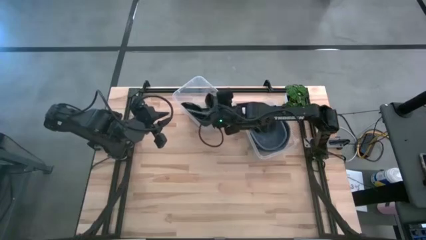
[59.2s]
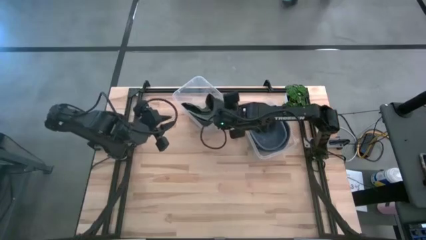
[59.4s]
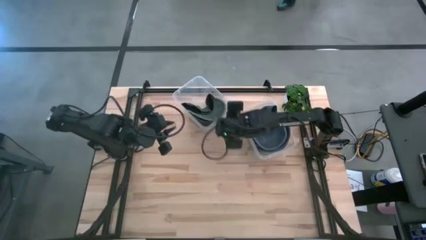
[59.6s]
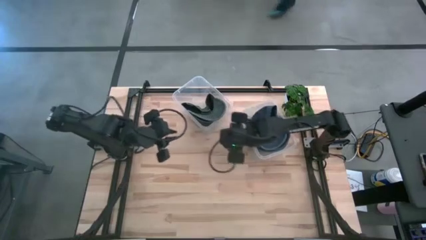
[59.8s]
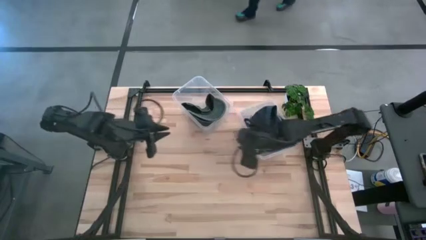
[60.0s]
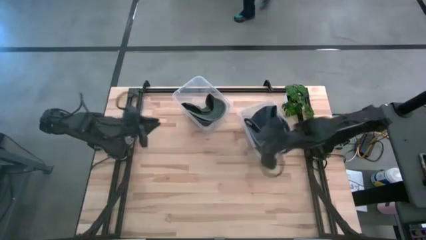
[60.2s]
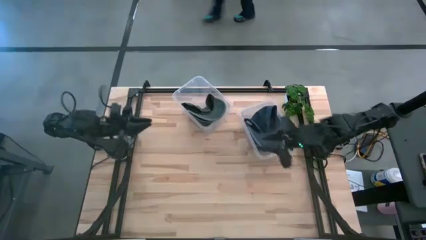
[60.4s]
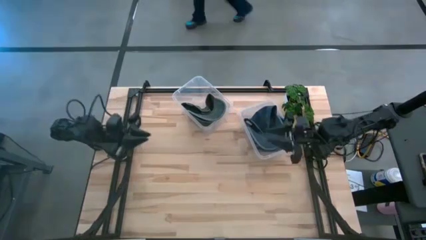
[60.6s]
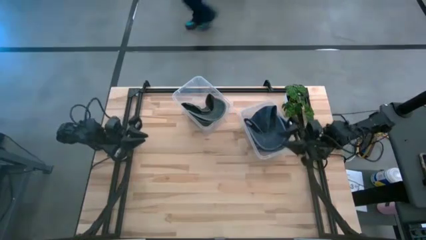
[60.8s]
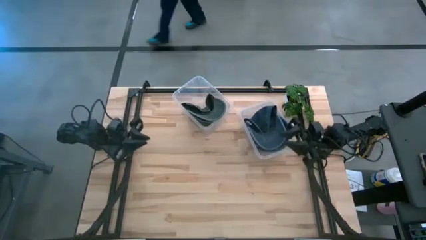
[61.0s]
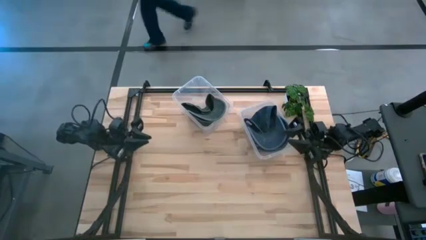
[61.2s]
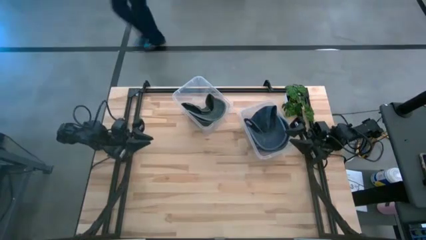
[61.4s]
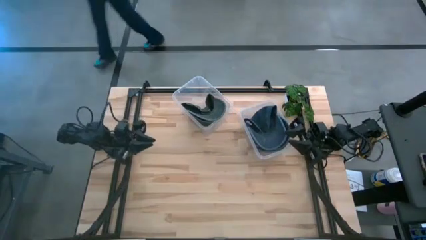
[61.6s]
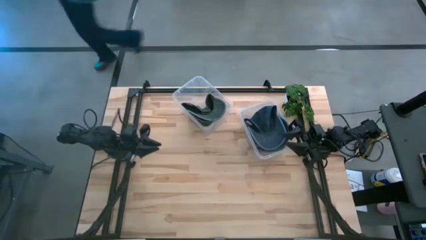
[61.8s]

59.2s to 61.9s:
Task: Pick & Place hat
Return to Home Position

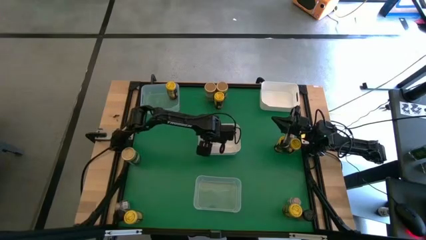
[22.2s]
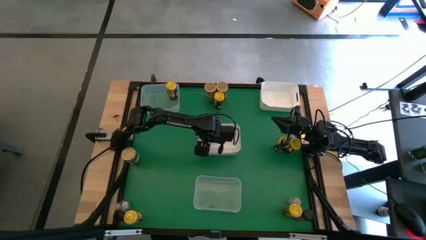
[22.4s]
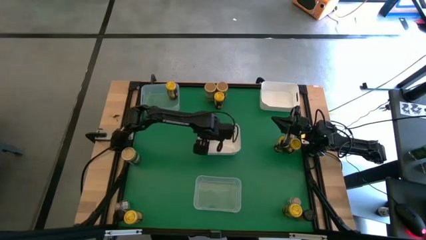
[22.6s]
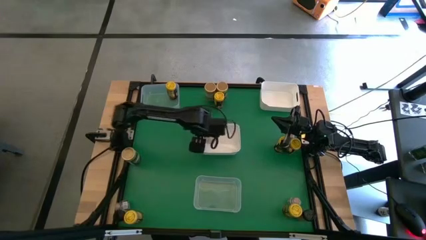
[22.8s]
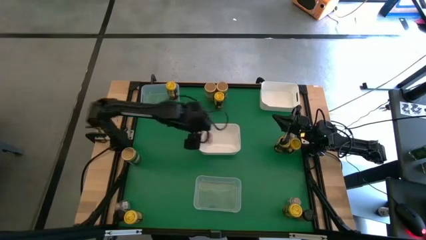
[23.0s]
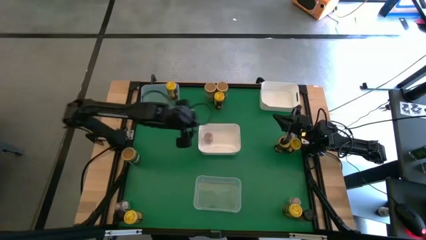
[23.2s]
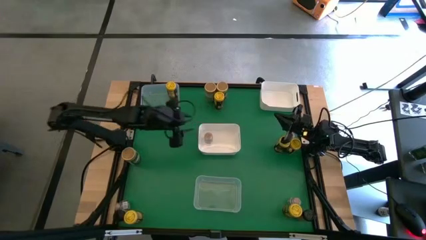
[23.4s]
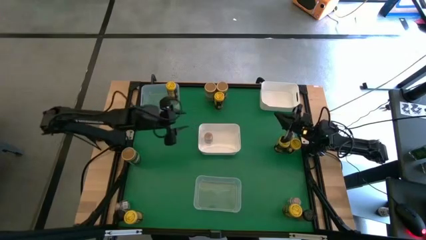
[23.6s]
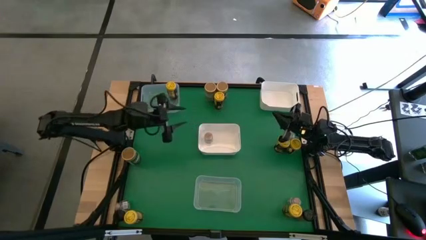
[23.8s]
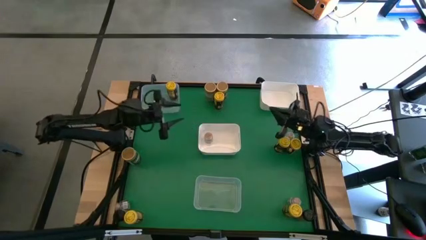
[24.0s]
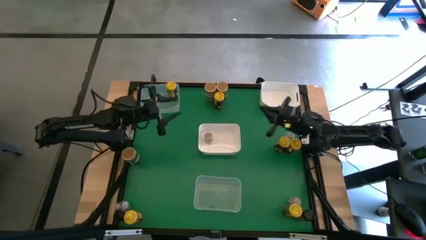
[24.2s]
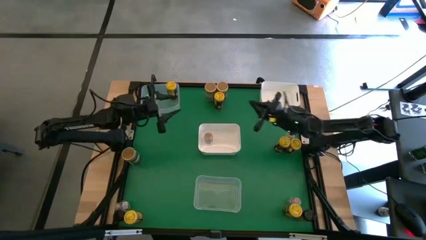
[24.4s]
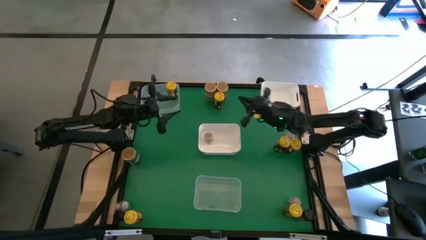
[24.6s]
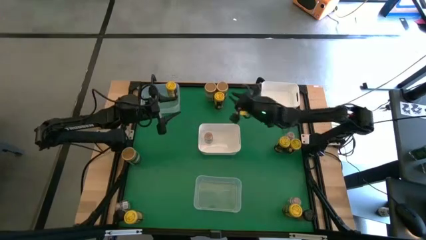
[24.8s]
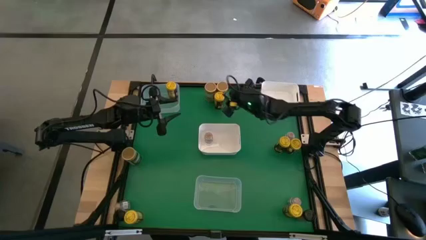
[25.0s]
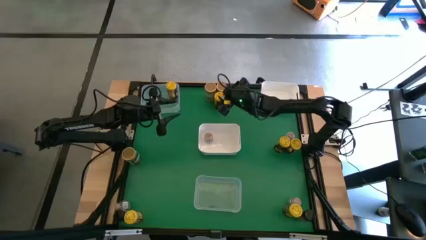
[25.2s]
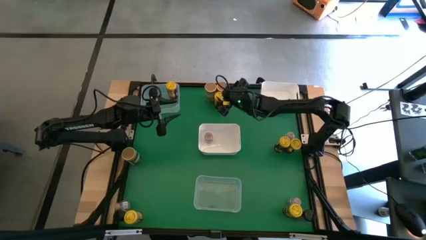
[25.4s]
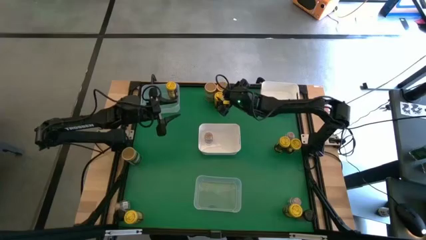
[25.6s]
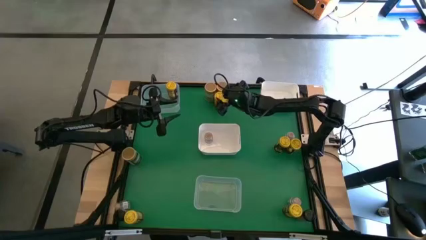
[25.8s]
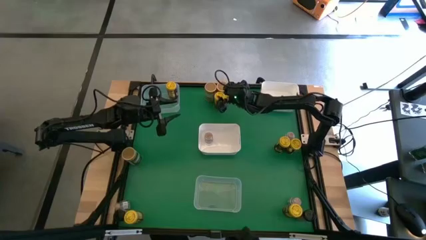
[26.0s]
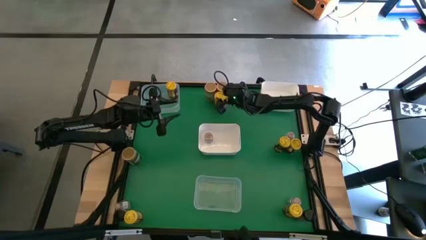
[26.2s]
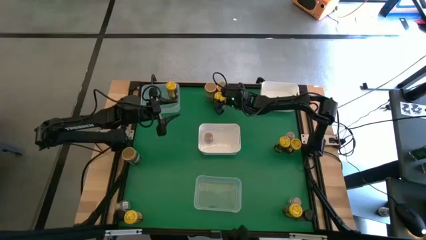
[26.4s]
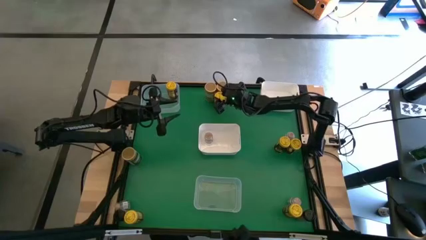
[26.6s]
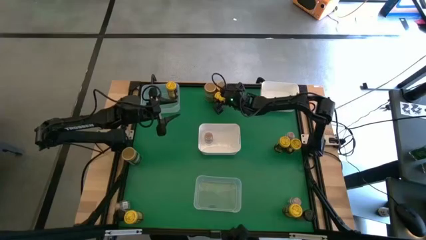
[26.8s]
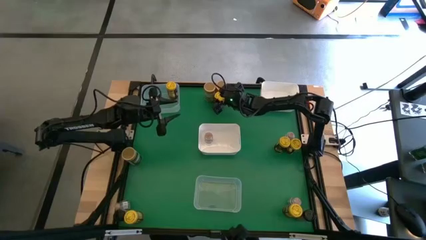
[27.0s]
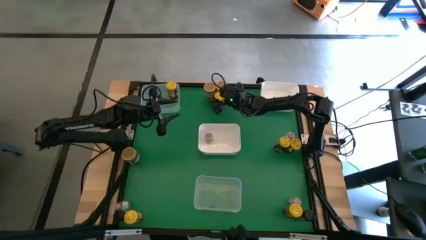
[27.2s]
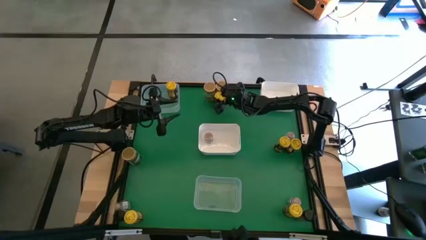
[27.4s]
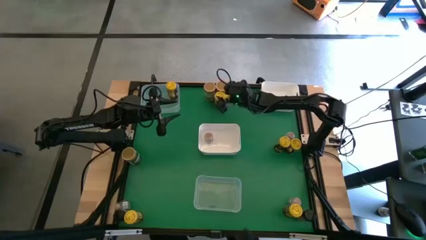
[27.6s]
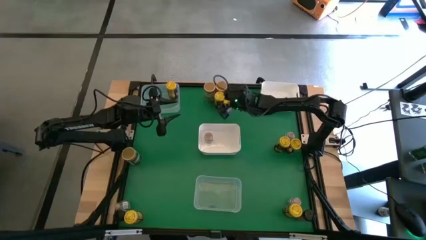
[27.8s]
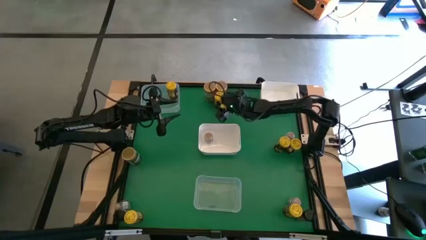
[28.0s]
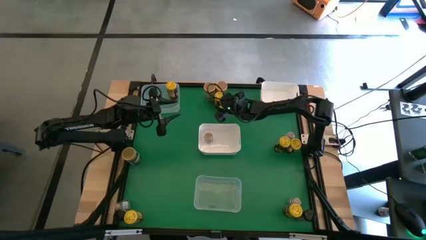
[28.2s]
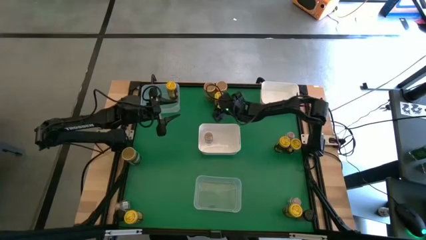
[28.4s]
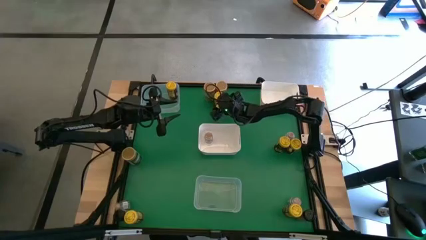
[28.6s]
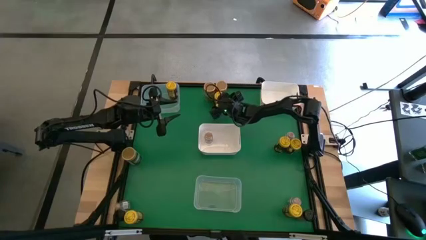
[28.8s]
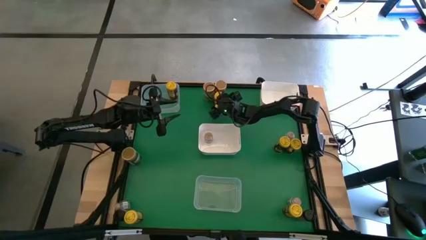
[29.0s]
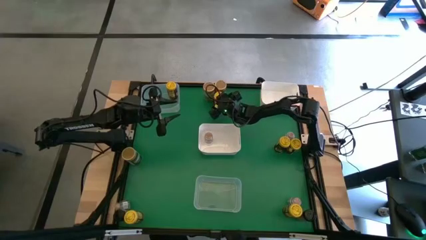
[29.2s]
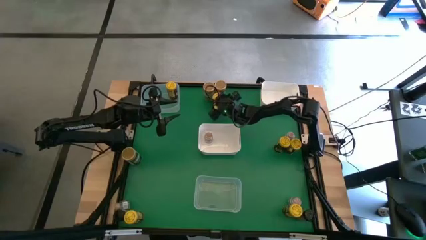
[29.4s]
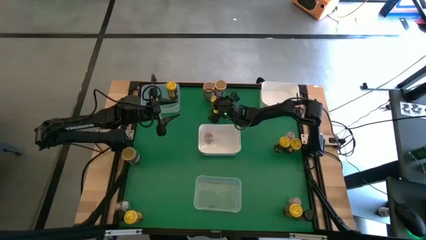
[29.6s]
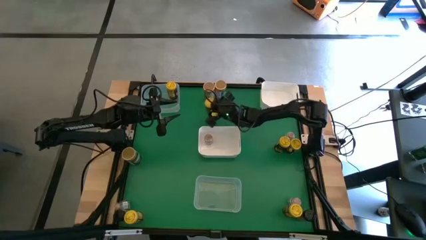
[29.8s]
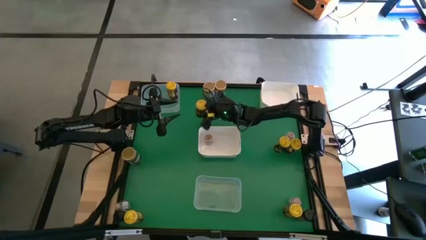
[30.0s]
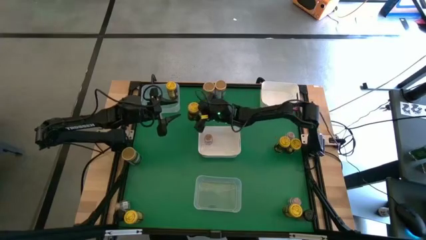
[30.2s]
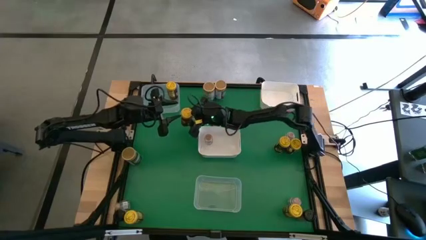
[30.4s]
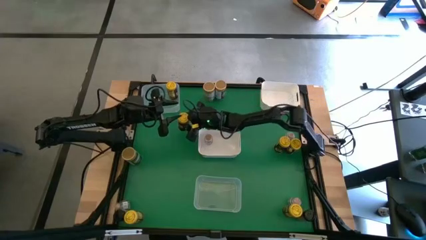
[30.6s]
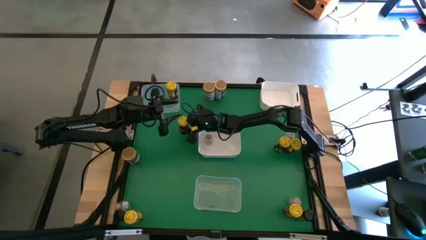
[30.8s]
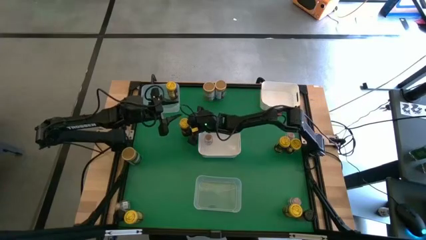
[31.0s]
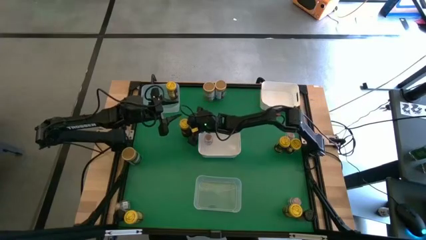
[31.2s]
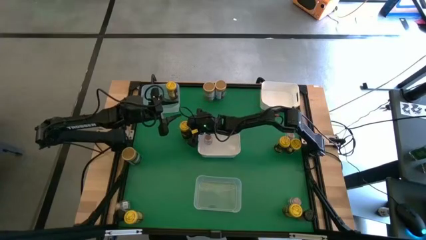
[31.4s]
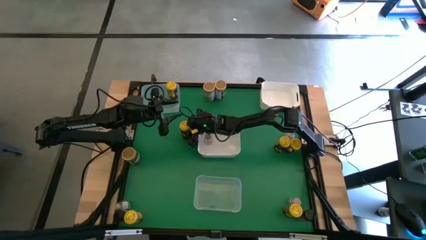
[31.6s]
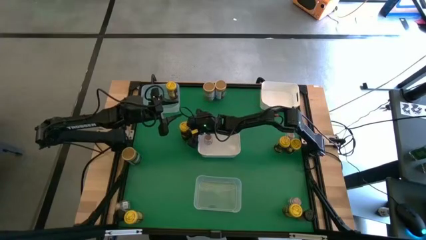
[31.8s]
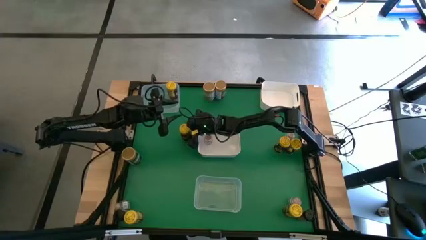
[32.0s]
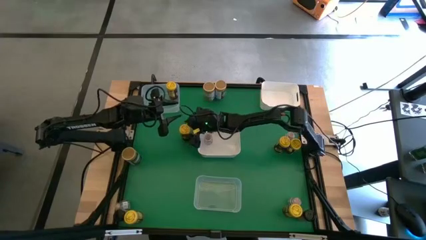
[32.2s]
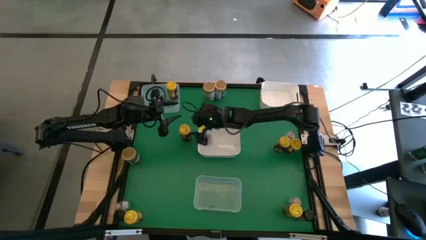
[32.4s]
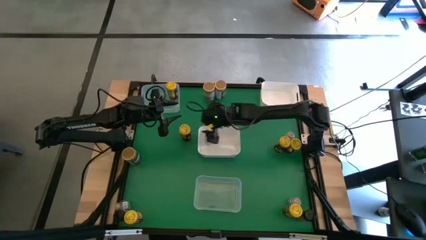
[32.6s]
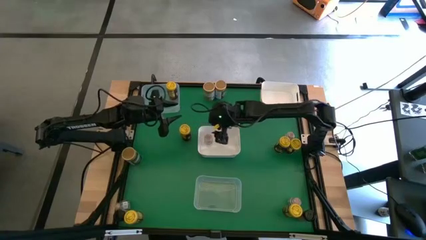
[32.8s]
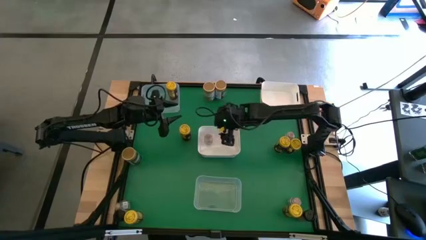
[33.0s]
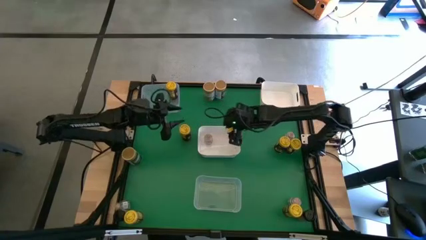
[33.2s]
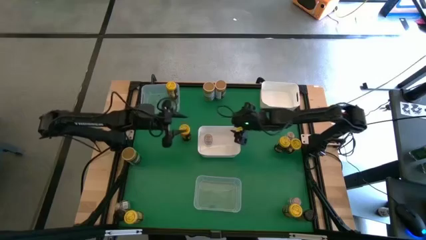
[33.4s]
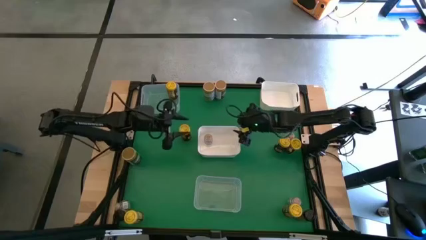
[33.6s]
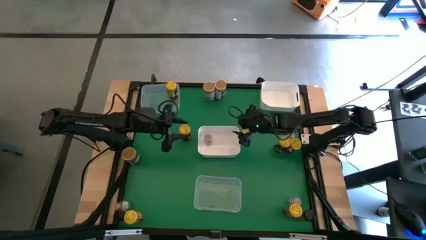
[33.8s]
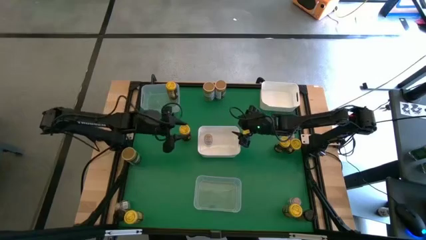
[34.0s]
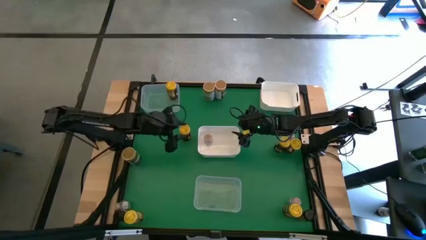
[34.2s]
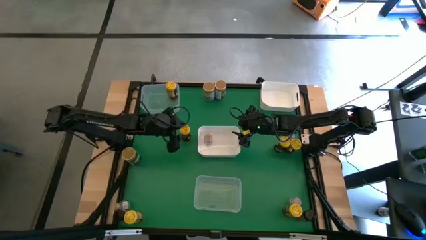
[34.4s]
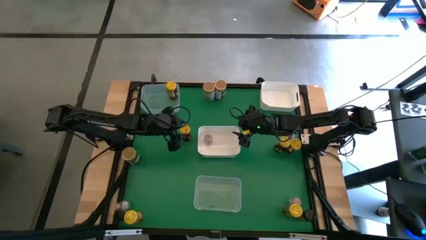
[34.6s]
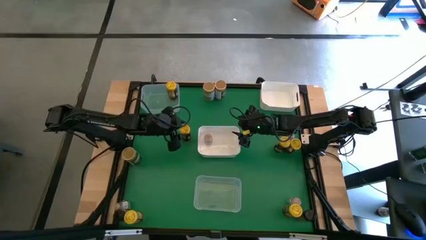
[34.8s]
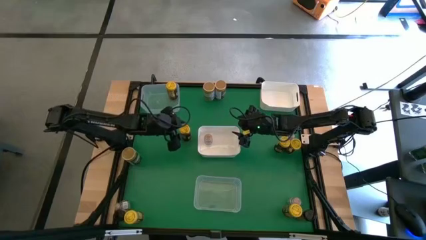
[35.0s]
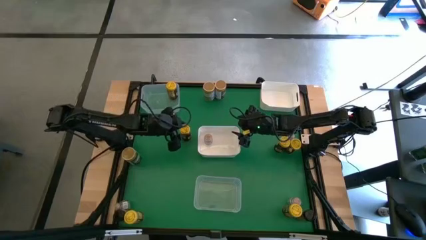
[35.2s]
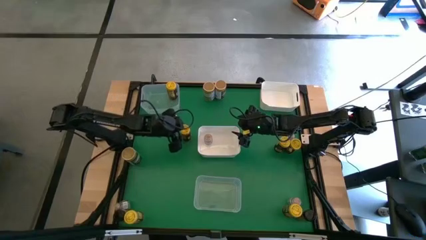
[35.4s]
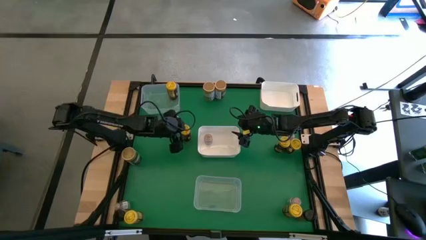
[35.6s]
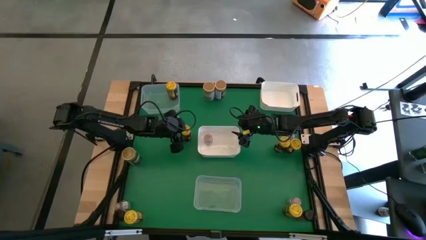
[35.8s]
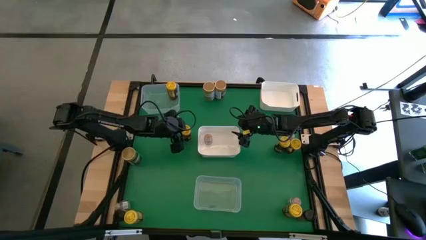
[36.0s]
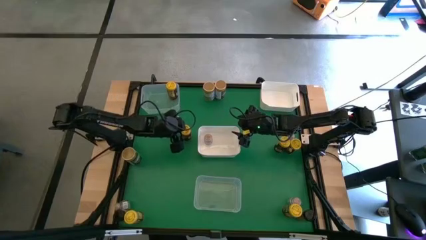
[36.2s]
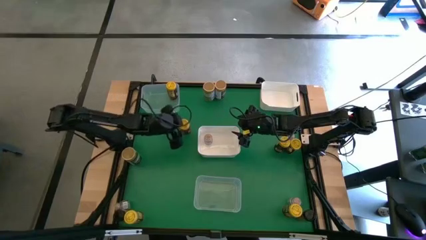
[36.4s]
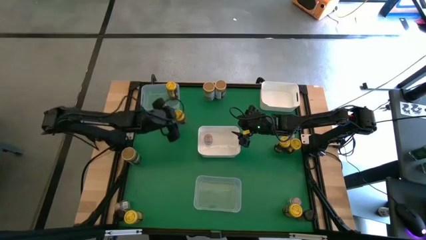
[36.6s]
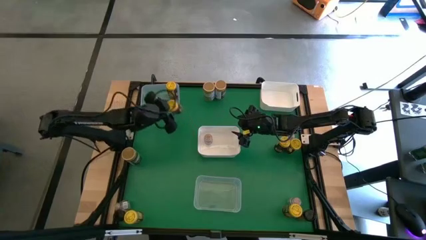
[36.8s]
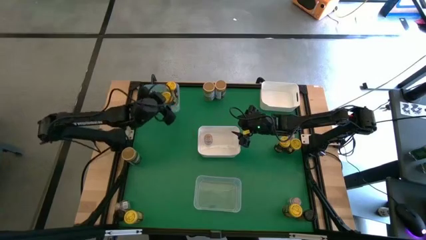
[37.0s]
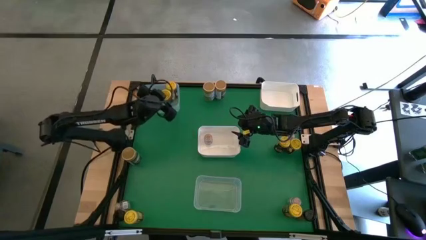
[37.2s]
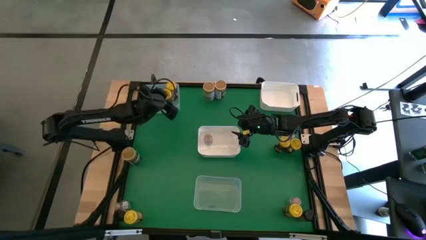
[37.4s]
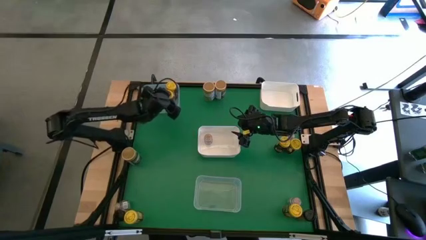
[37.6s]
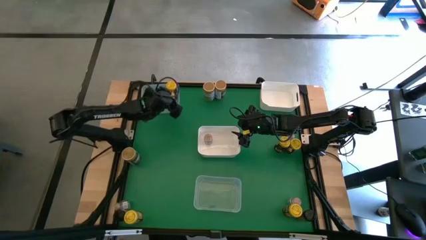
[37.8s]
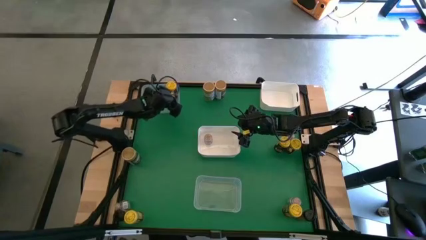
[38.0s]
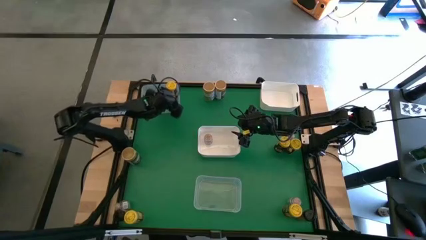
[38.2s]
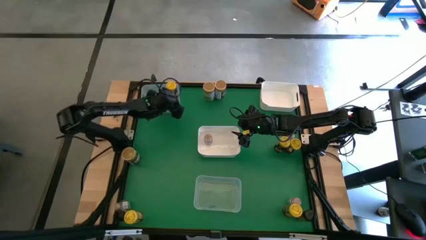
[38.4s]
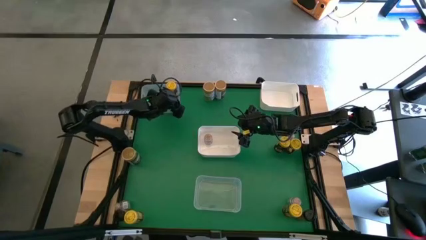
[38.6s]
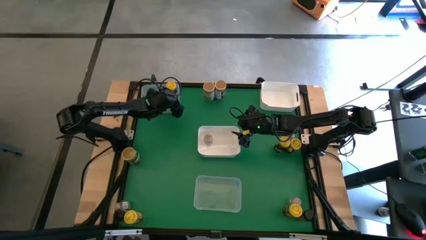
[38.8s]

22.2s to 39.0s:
Task: Sort spices by type
Put the top yellow seasoning bottle into the top transparent bin
